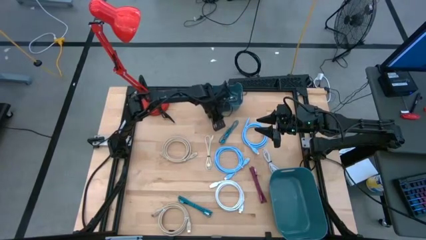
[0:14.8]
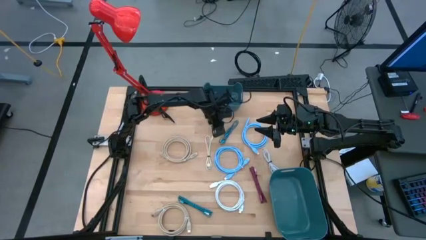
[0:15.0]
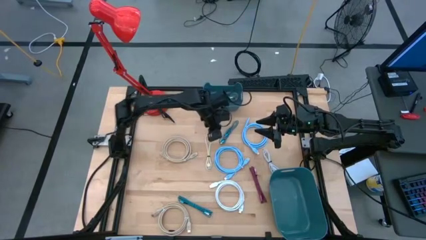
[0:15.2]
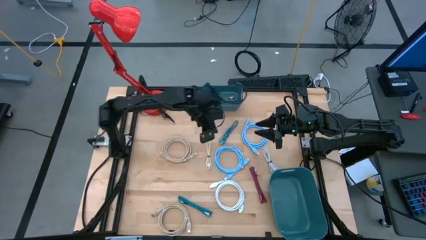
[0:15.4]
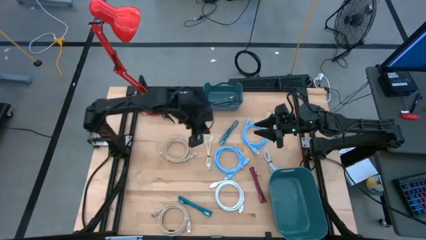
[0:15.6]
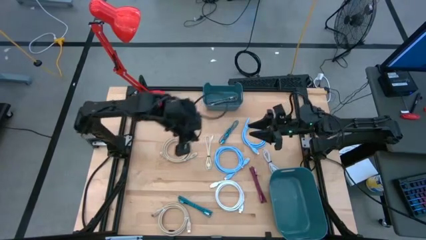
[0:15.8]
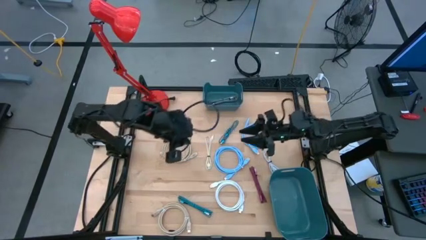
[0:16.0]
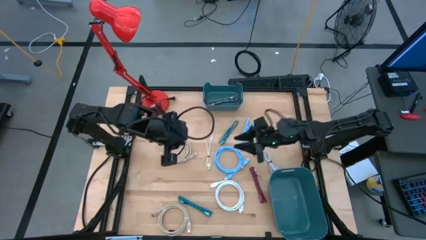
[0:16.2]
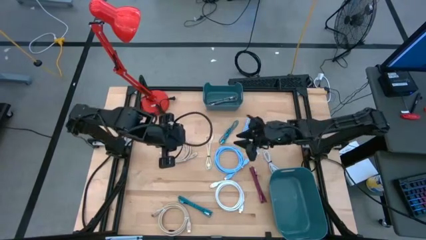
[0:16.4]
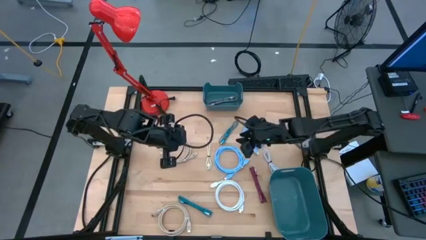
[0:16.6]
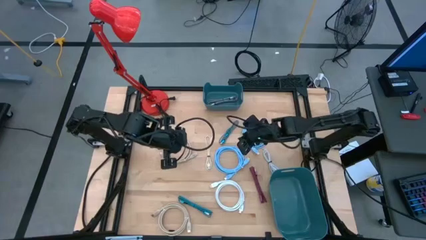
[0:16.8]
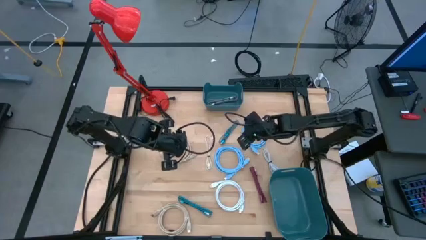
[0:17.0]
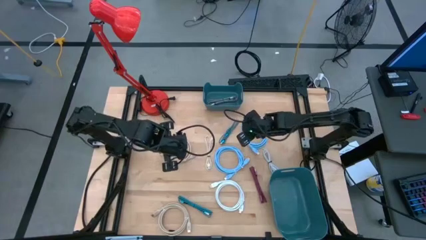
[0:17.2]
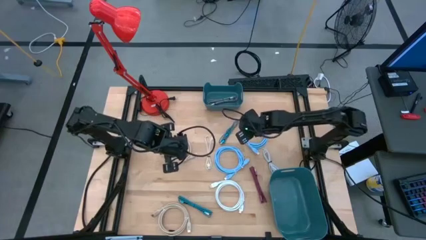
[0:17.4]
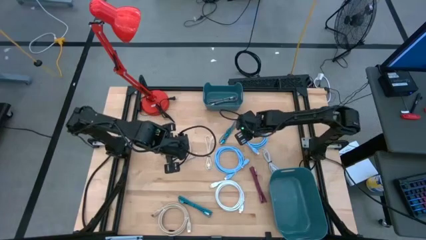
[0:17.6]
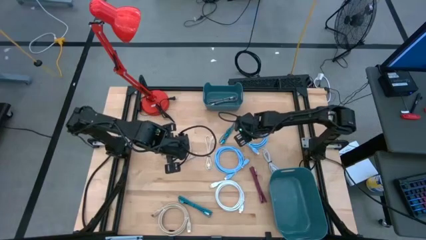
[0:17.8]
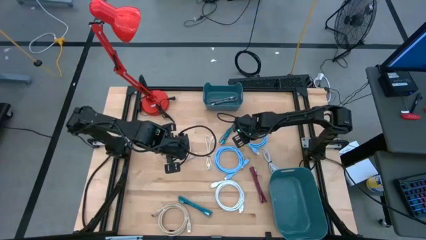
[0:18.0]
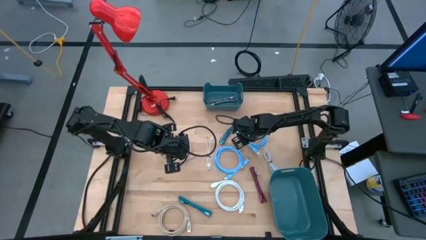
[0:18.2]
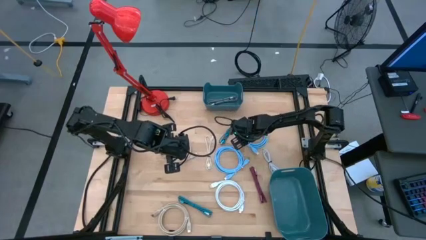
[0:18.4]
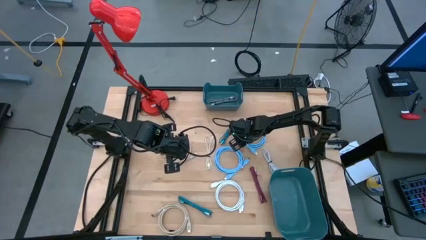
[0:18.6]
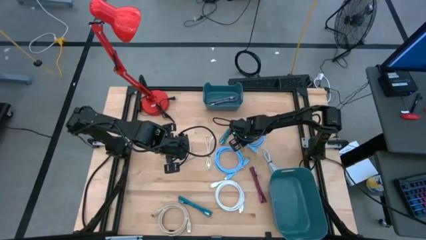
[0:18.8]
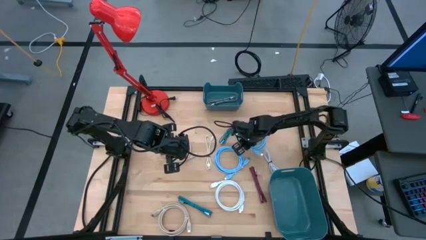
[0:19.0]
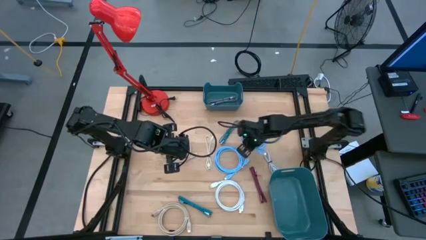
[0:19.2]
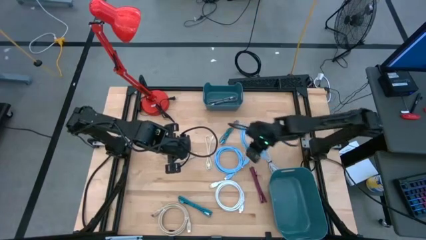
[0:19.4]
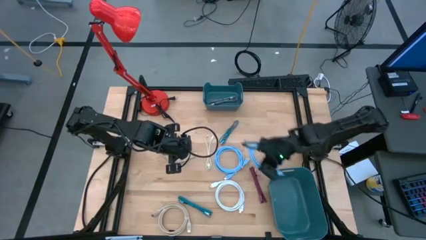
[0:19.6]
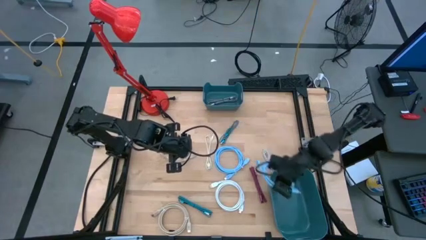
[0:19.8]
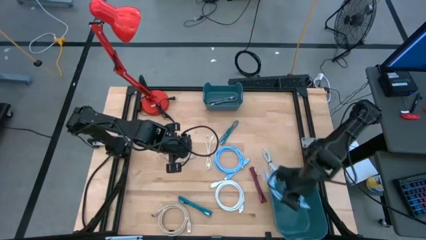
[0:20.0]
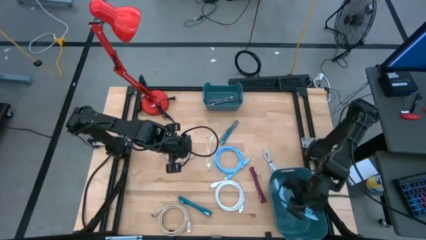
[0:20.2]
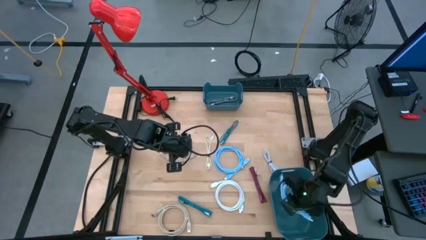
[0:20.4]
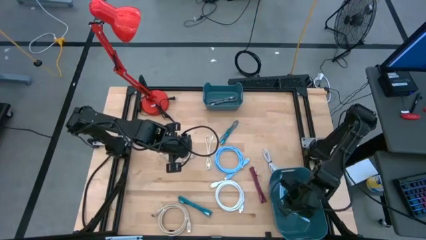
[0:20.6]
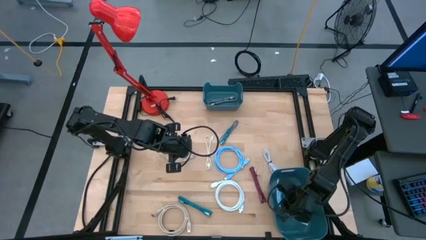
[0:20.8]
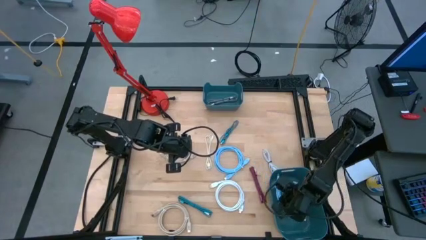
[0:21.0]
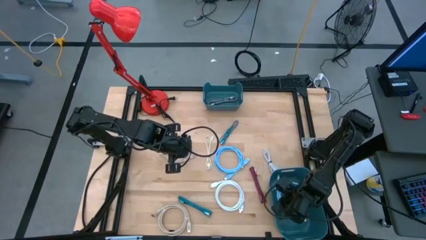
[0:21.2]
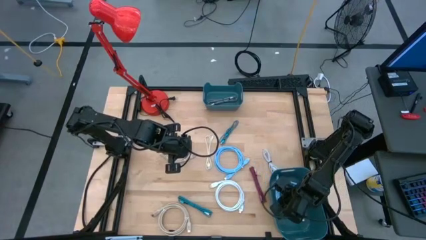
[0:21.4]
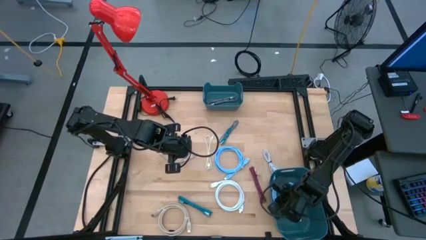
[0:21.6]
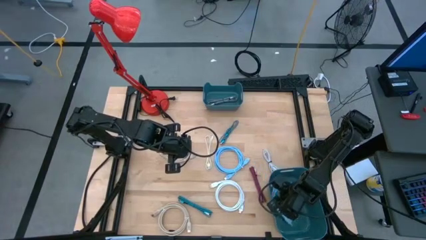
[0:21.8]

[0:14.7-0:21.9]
Task: Pick & Place USB Port
Put the top blue HDMI cable into the bottom blue bin

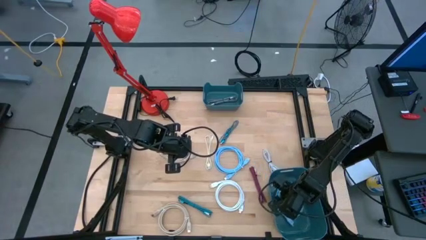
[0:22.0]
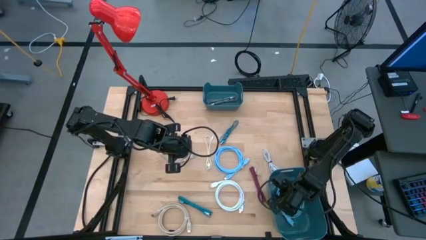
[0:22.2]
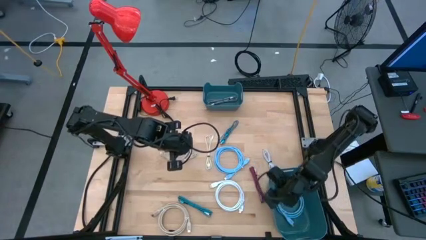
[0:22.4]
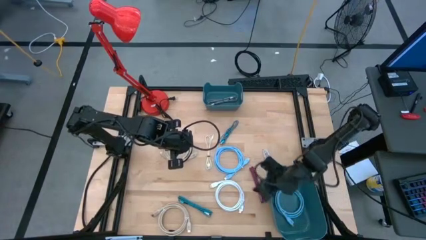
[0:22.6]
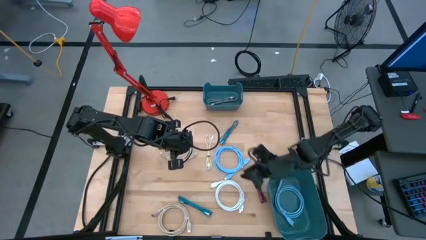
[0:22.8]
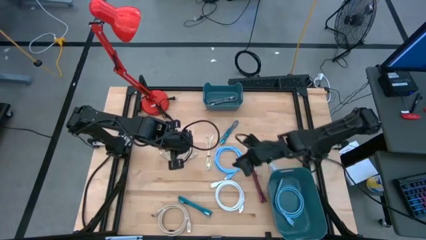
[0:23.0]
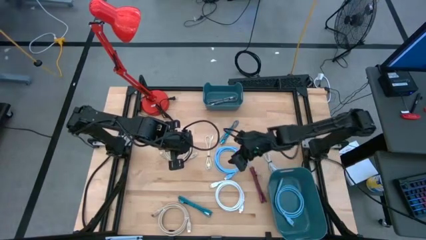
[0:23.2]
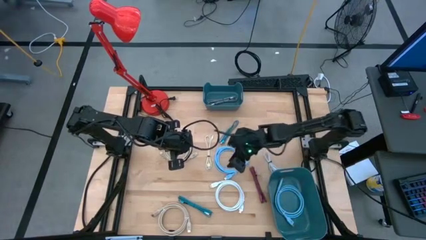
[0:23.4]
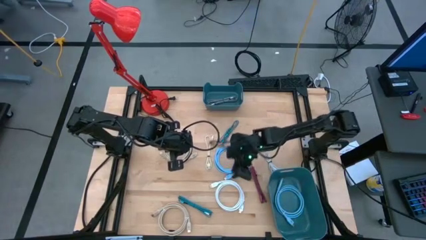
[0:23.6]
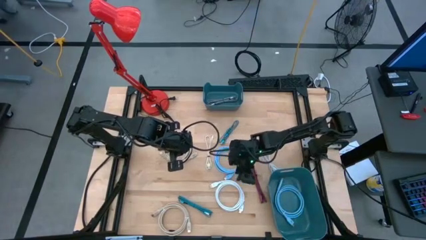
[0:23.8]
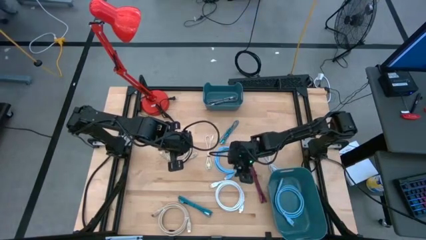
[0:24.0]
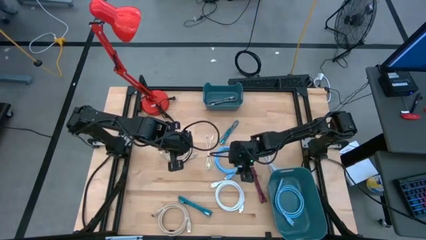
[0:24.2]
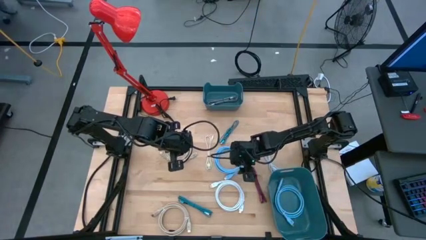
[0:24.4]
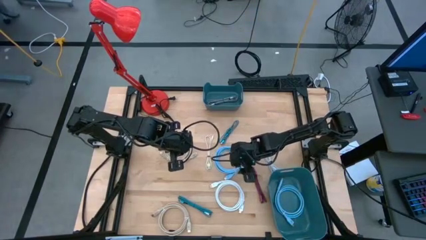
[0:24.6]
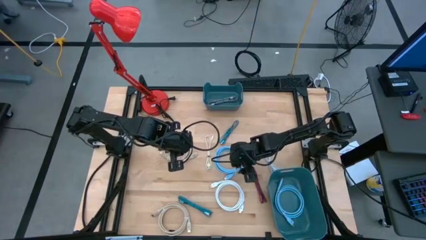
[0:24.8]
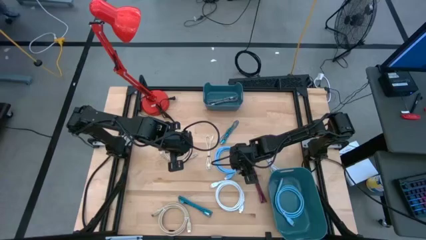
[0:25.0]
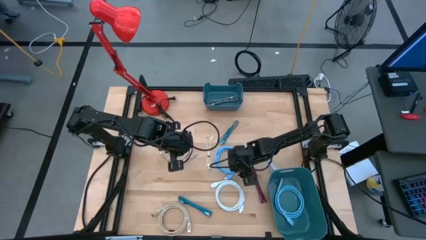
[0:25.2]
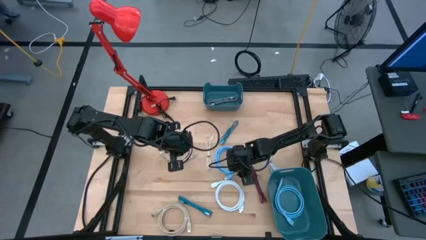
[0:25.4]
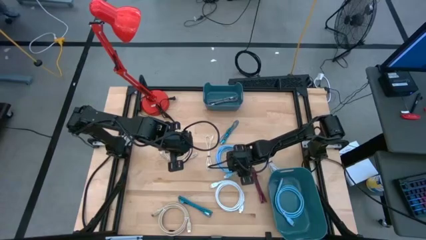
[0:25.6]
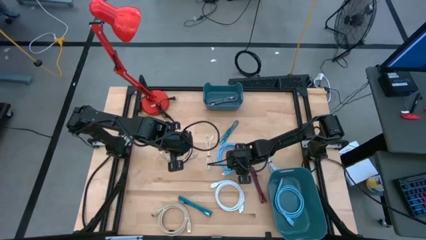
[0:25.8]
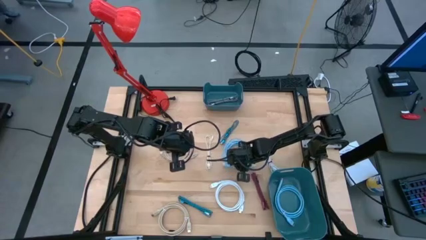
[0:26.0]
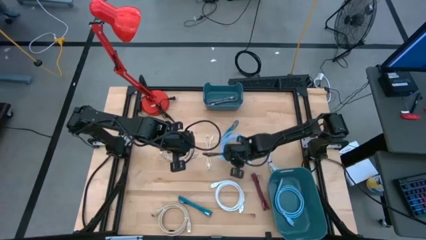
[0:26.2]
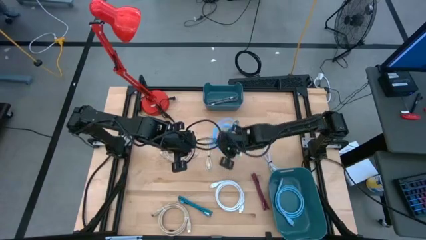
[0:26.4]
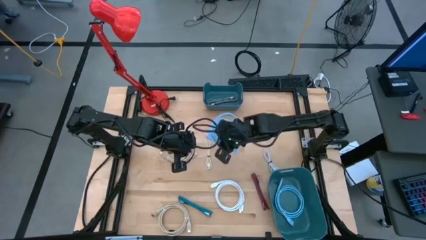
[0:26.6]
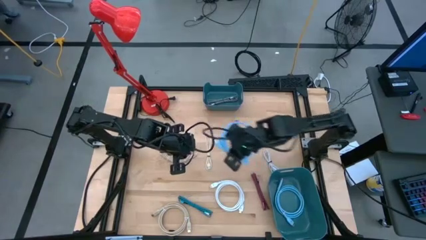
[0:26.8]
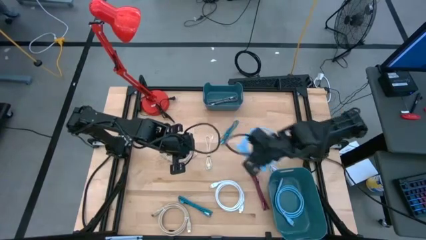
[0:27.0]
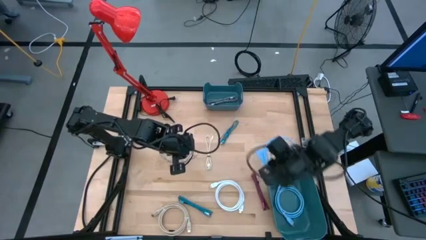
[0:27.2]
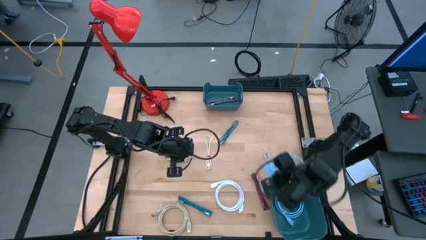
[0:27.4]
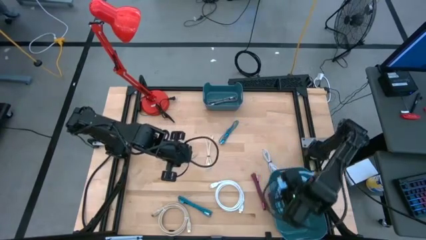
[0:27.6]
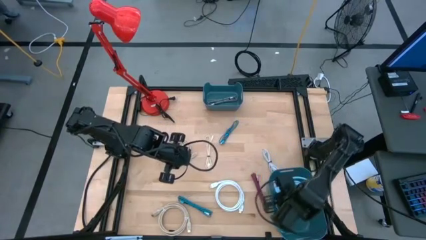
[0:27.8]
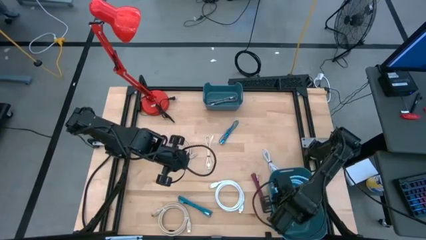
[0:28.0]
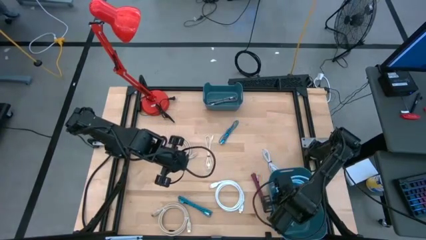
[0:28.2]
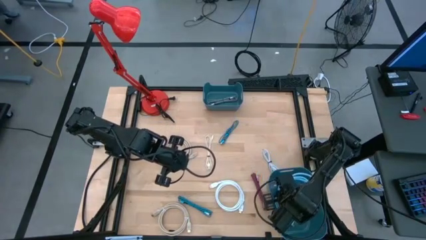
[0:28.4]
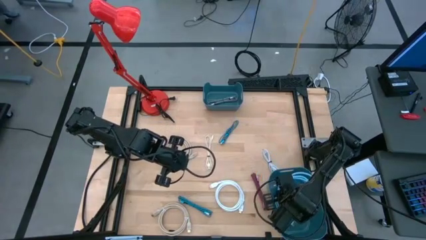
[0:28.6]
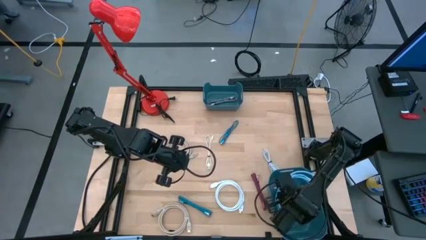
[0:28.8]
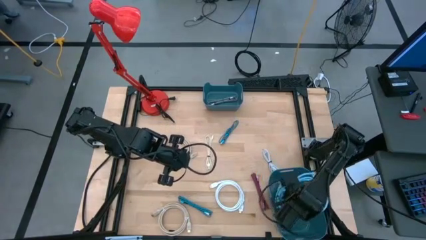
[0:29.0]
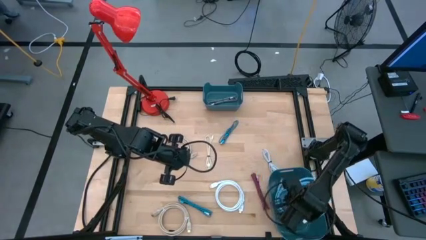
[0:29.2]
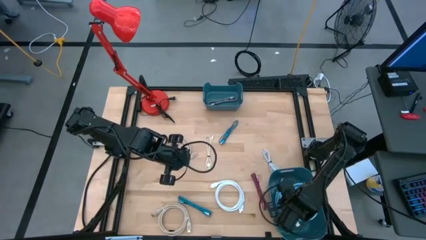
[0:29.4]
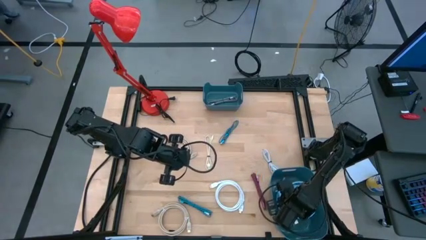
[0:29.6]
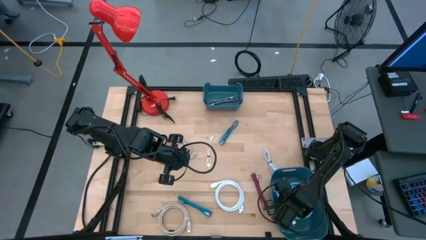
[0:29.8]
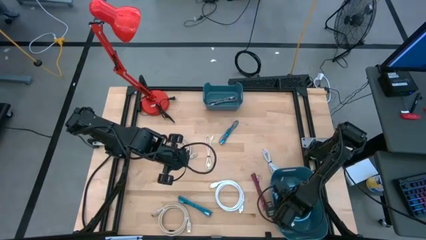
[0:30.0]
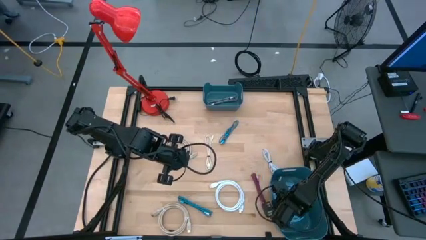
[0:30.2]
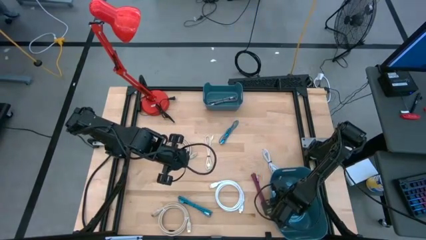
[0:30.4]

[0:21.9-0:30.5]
Put the blue HDMI cable into the bottom blue bin
